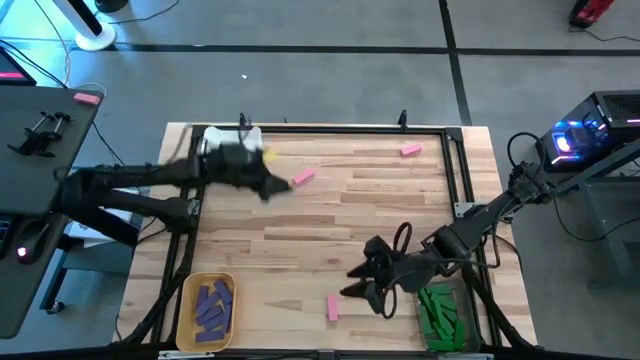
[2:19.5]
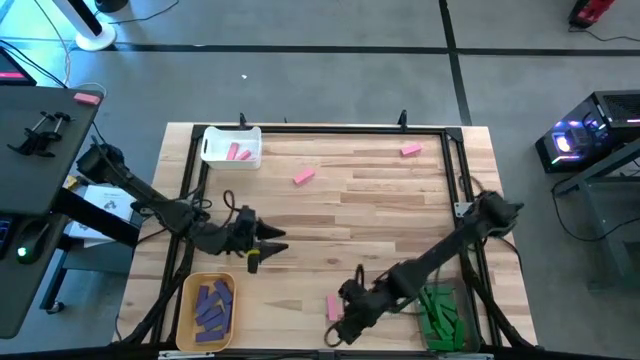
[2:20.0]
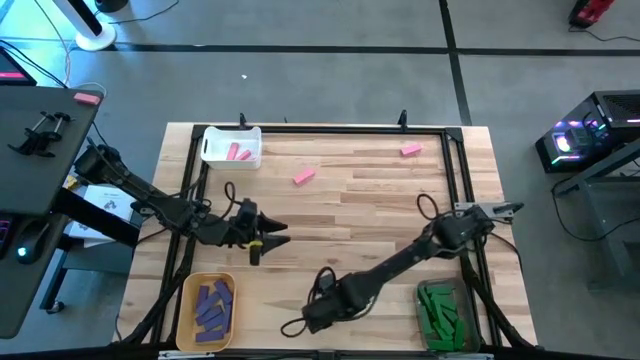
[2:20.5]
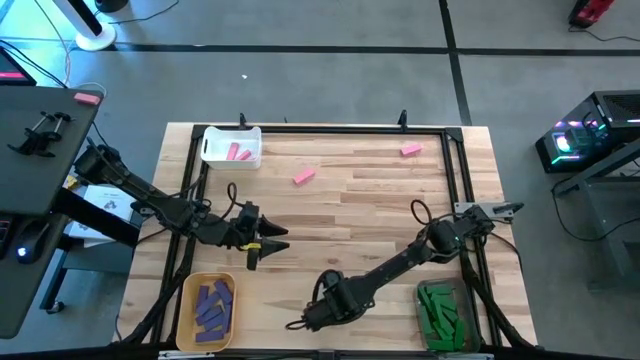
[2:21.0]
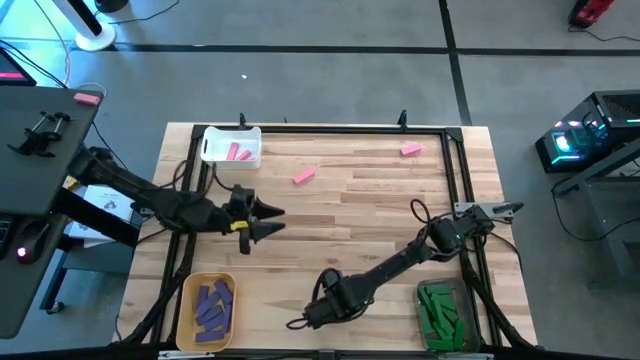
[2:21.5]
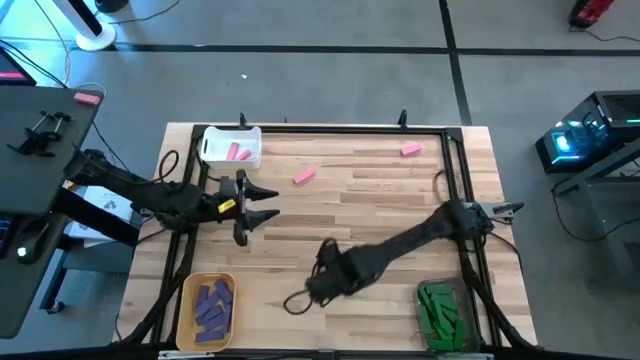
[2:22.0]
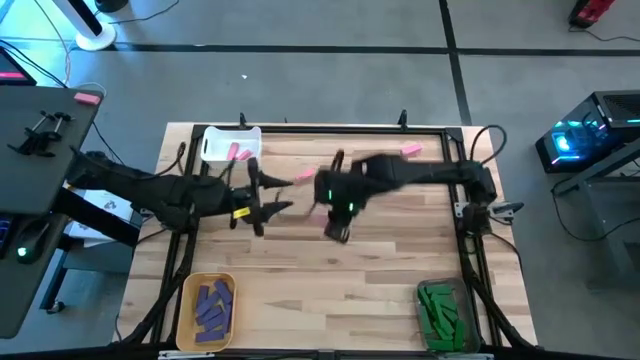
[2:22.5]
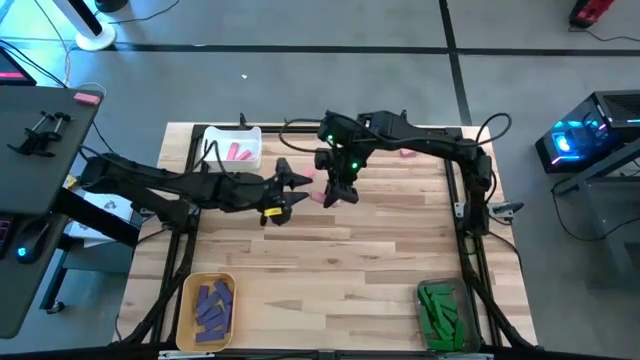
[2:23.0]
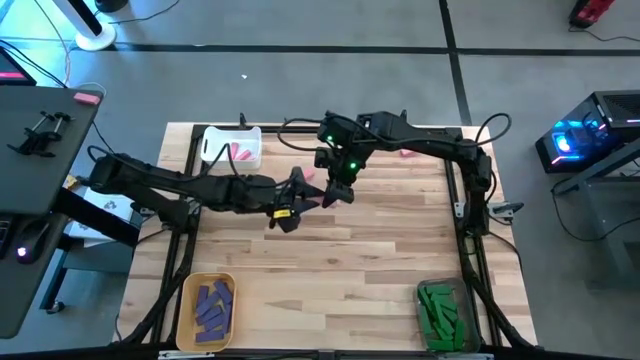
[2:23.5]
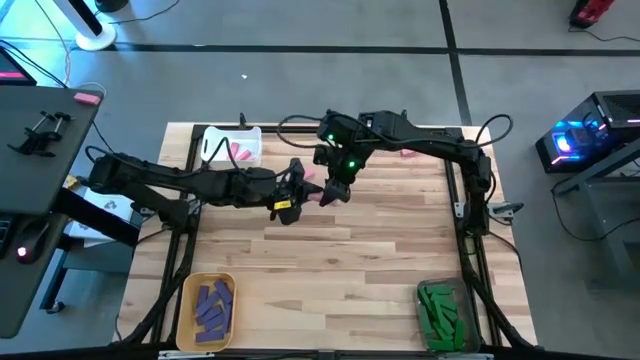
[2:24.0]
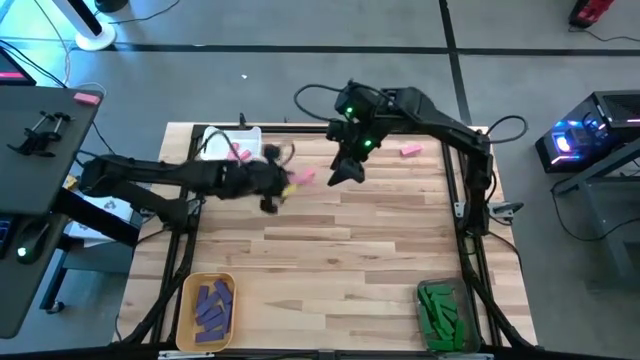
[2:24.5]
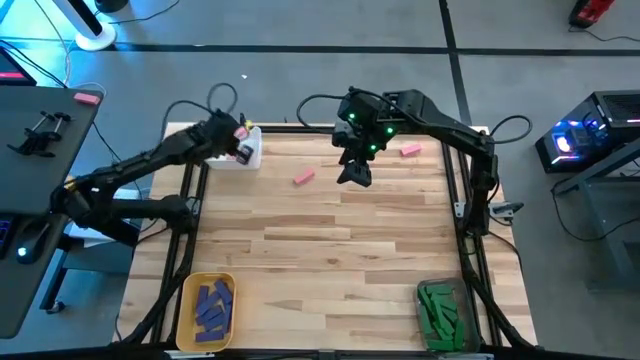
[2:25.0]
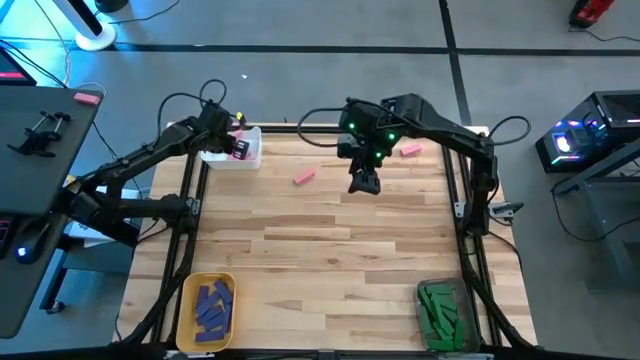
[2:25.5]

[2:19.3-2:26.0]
Task: Sort blocks
Put the pink wooden block into the white bin

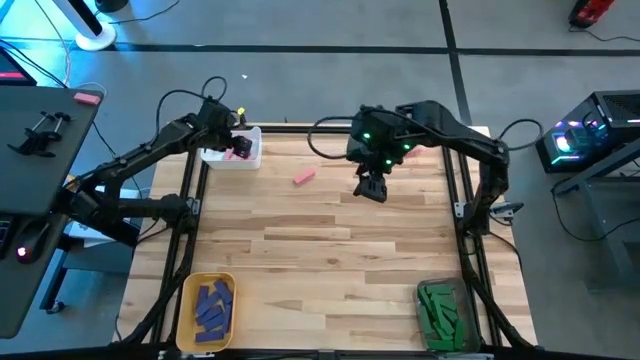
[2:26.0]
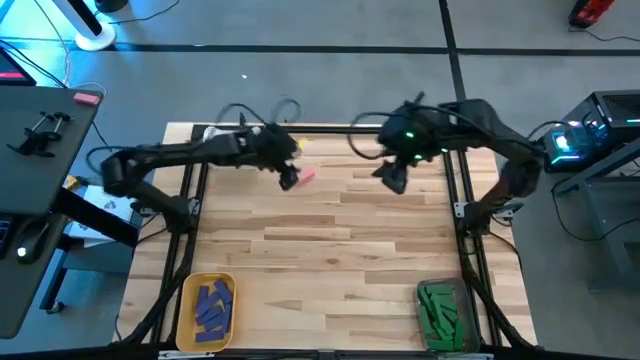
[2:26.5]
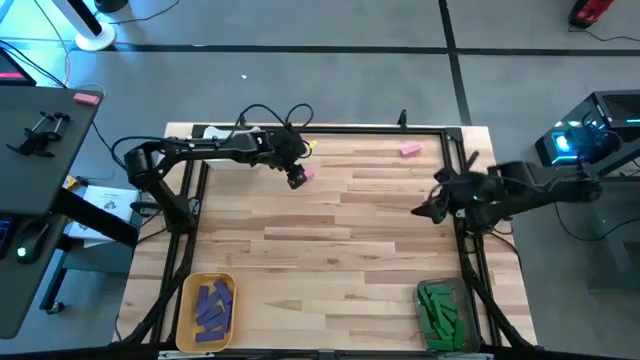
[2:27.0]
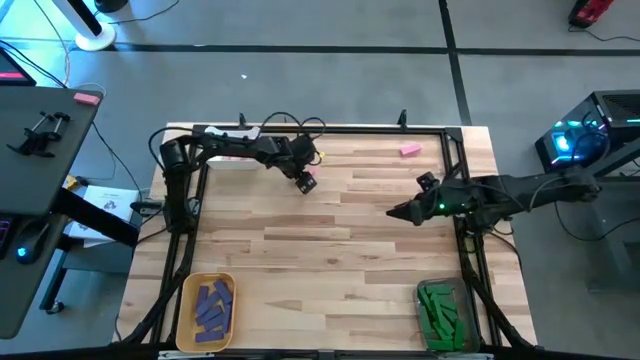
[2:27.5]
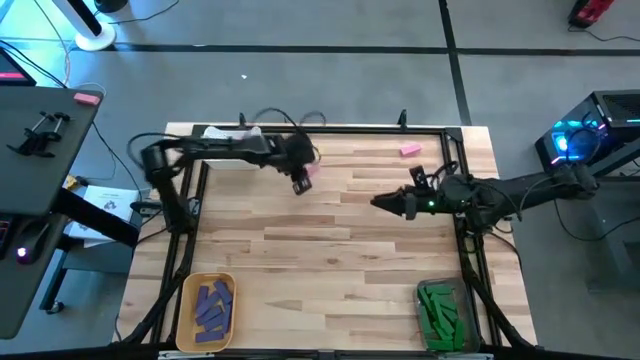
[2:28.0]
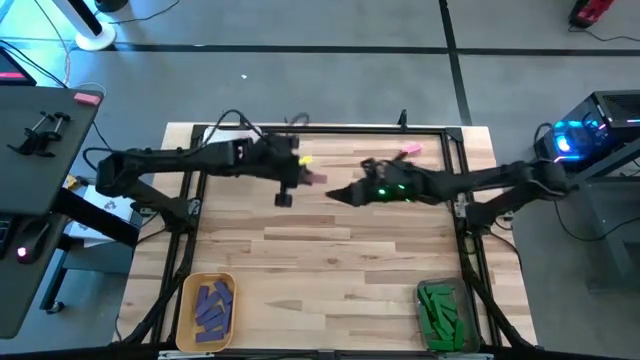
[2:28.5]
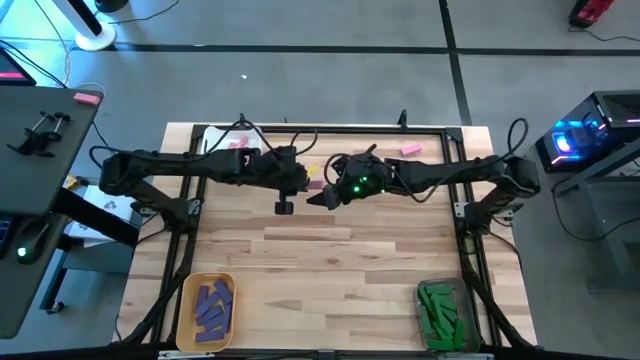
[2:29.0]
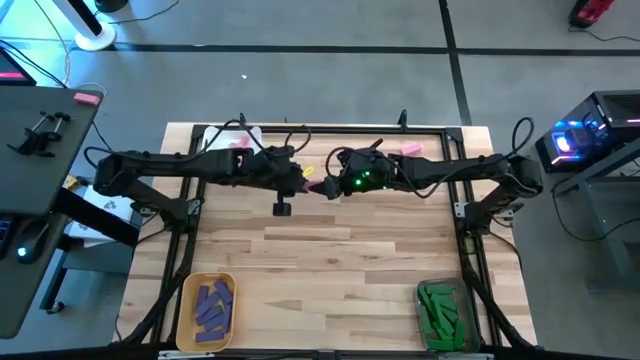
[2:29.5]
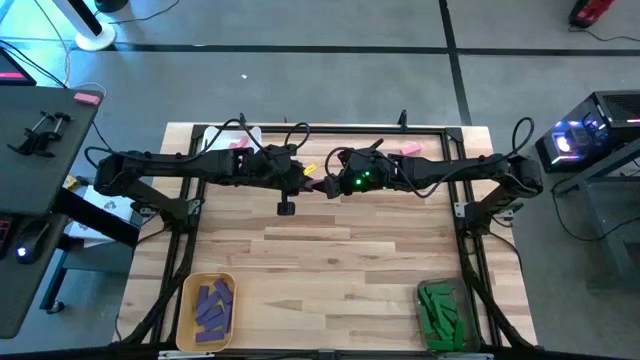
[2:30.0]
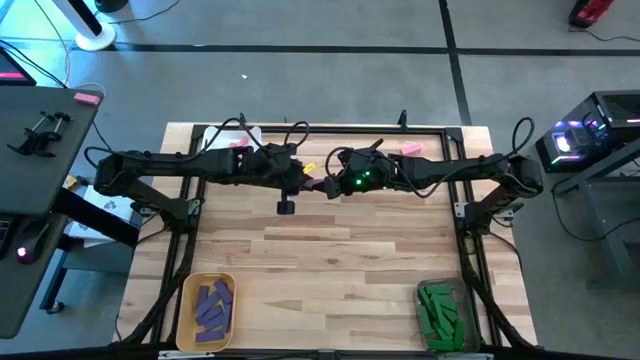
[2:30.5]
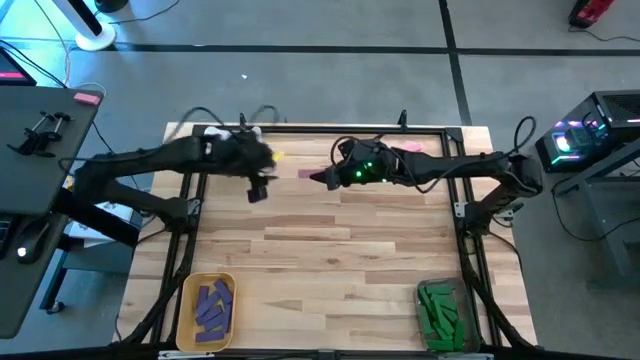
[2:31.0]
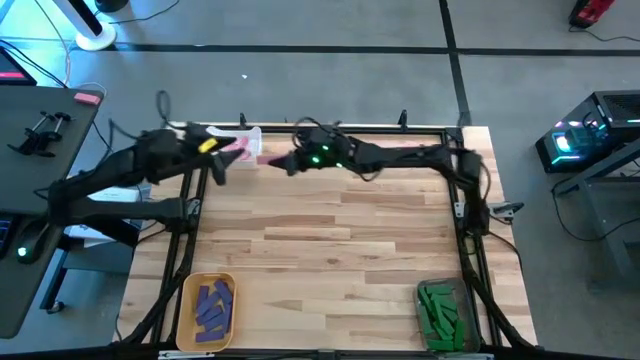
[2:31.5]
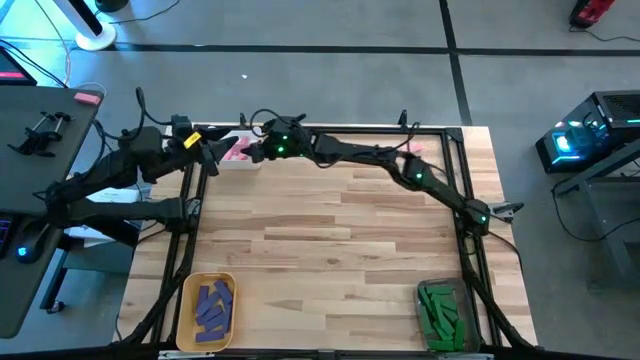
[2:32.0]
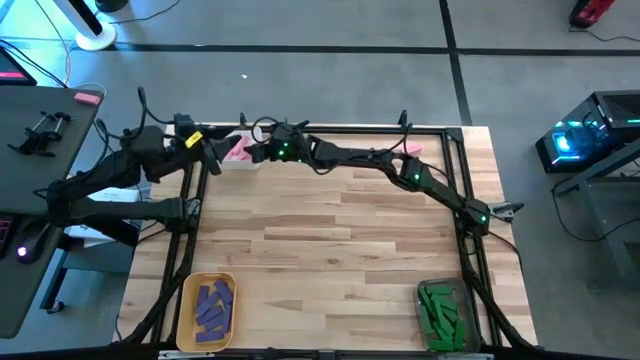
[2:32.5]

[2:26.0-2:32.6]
Put the pink wooden block into the white bin

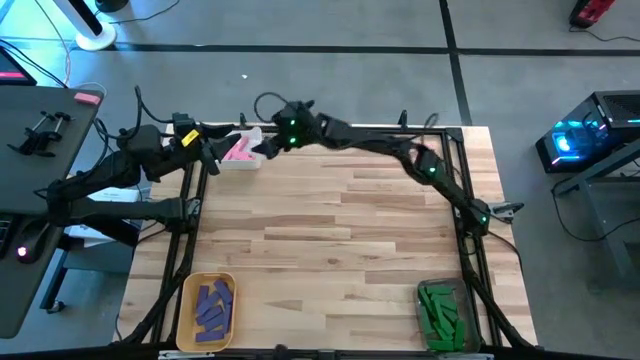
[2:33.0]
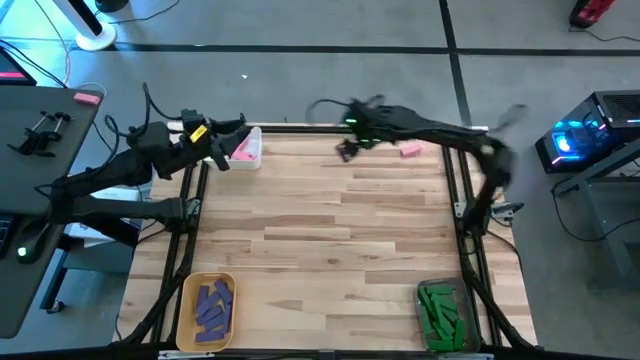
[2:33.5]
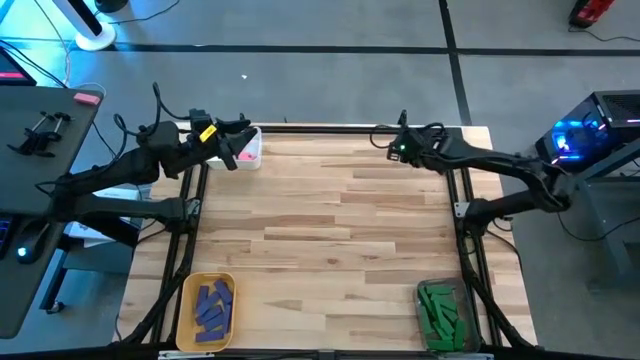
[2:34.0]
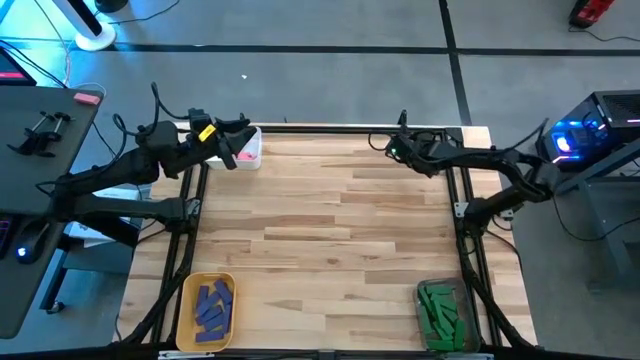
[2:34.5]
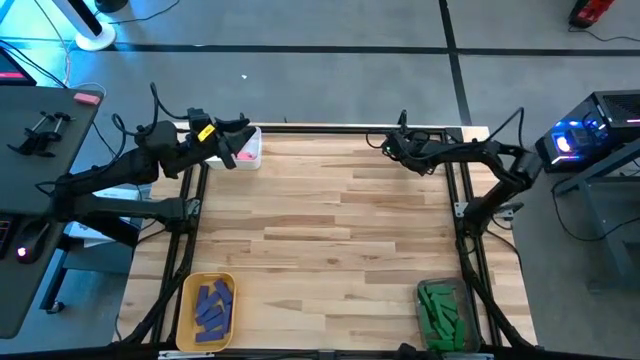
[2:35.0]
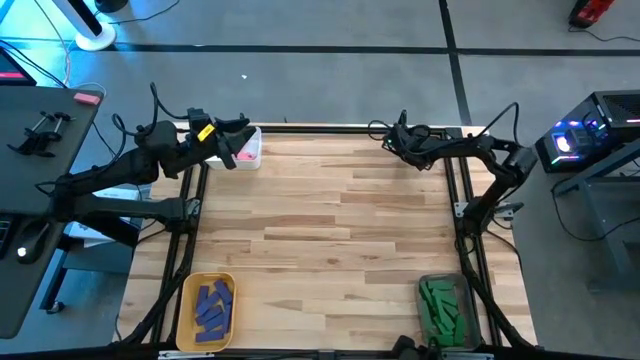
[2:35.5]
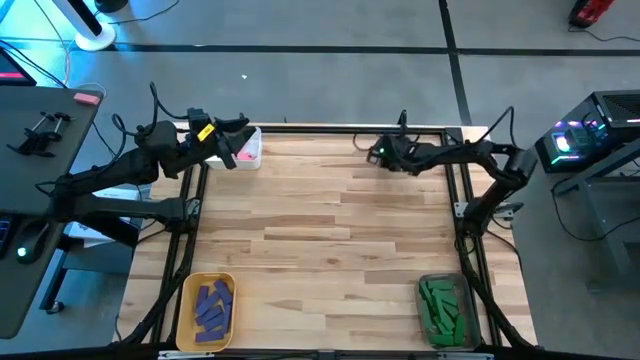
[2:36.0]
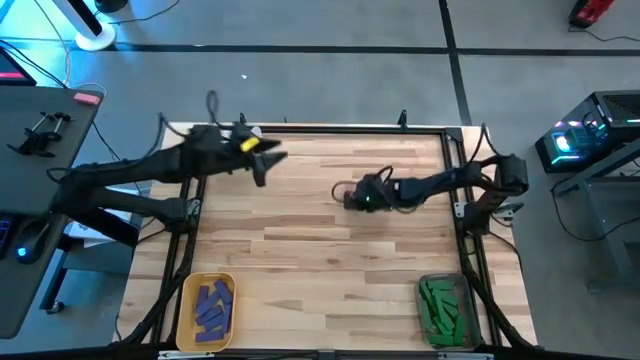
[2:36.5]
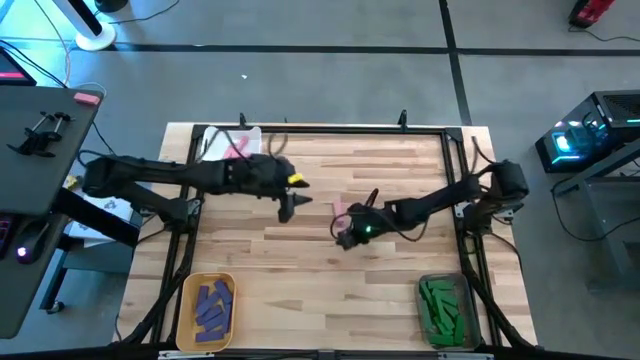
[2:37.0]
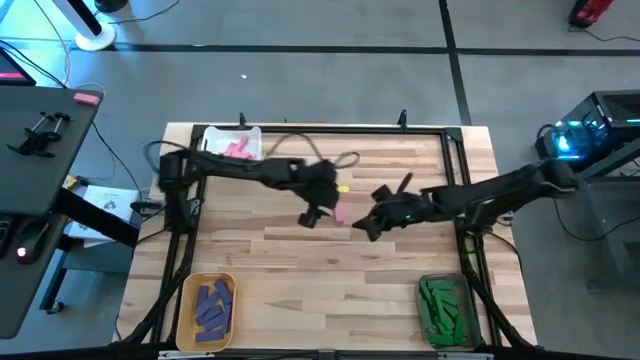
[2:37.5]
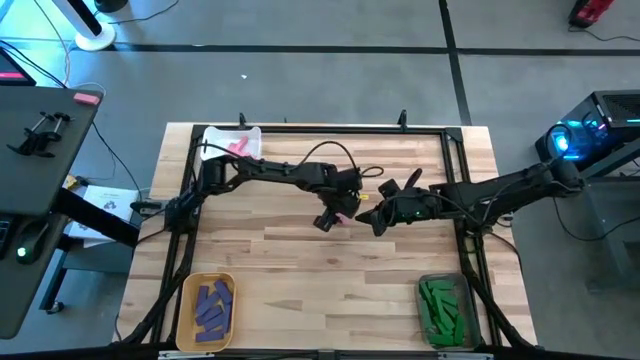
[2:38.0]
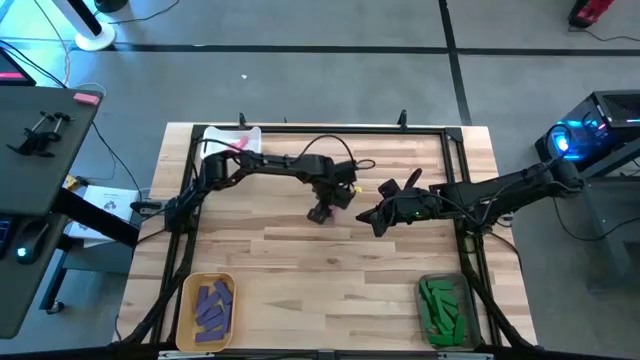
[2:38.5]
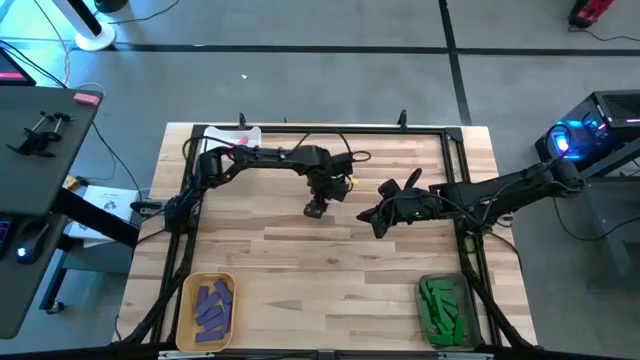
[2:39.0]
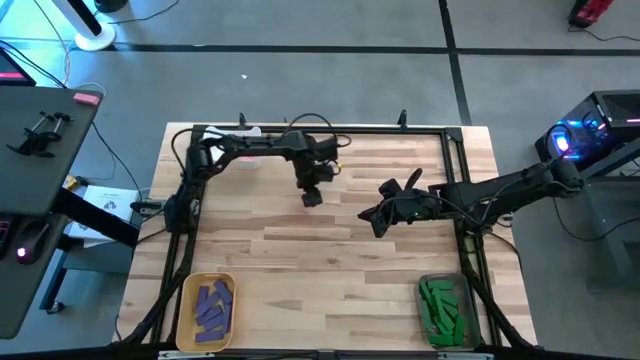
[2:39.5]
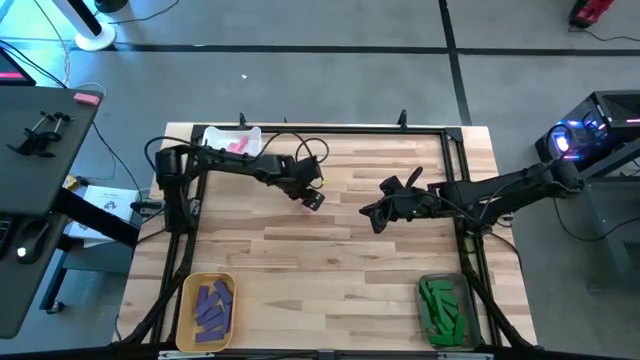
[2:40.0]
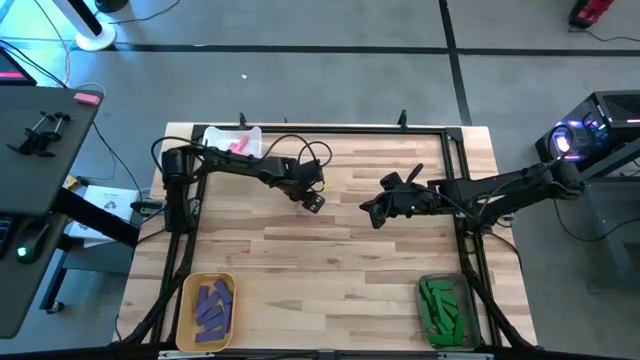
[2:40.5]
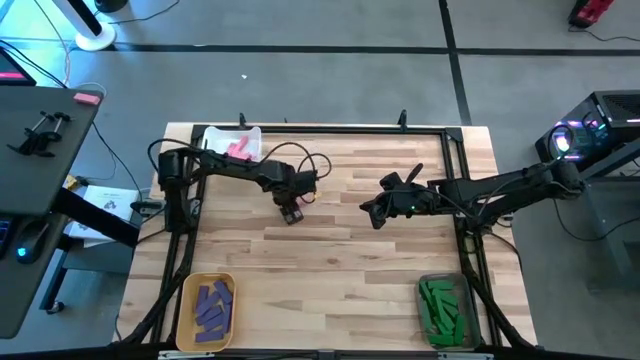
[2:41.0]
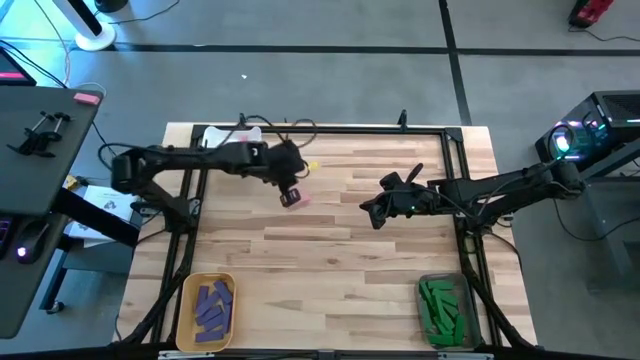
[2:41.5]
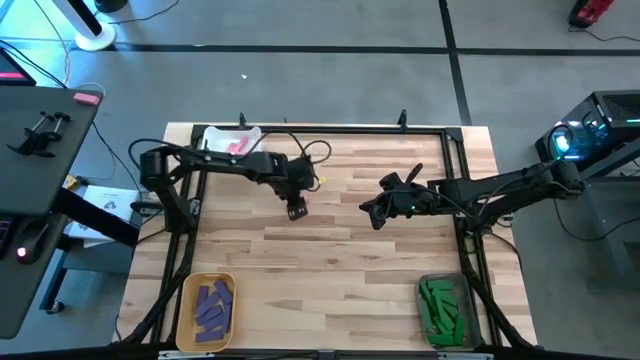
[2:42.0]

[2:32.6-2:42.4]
Put the pink wooden block into the white bin
